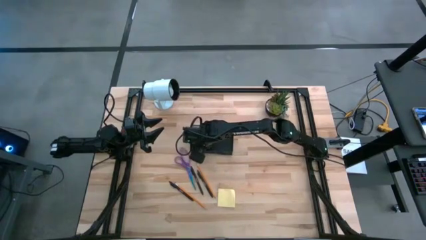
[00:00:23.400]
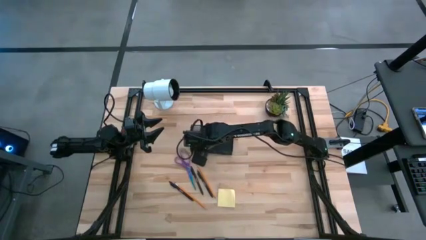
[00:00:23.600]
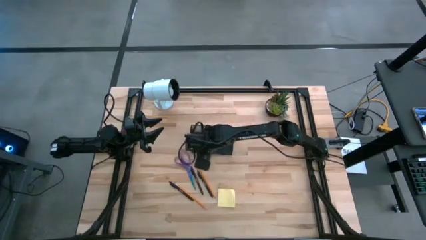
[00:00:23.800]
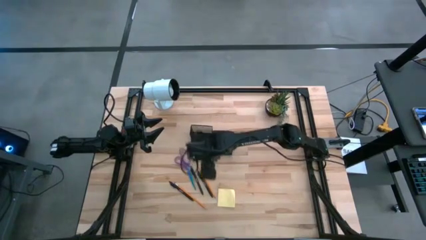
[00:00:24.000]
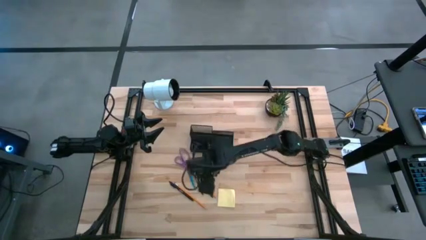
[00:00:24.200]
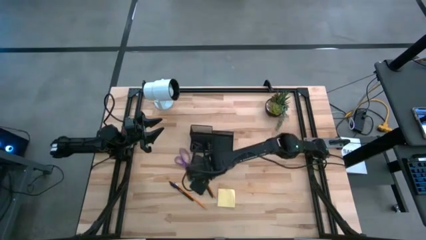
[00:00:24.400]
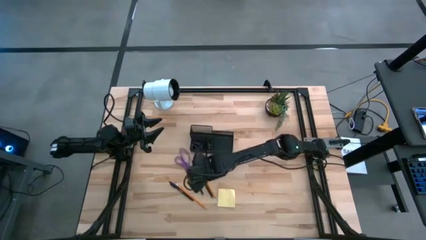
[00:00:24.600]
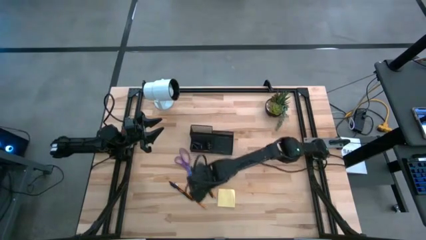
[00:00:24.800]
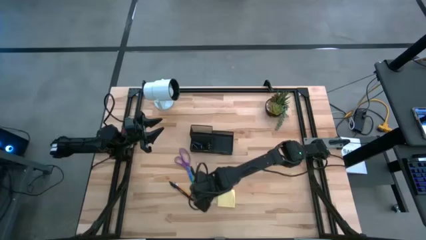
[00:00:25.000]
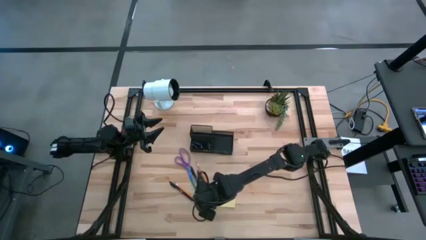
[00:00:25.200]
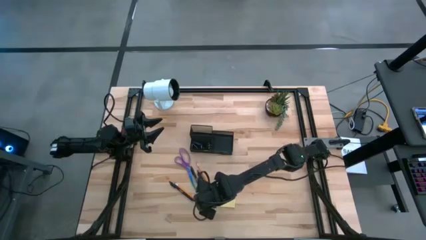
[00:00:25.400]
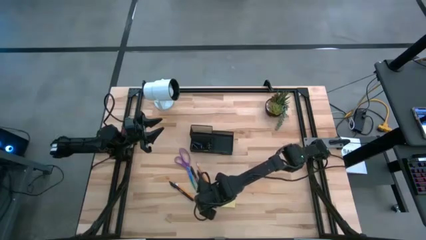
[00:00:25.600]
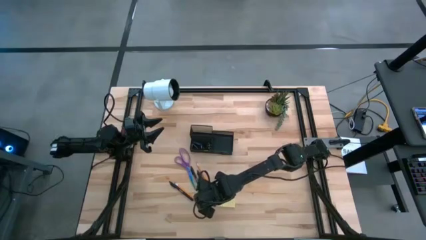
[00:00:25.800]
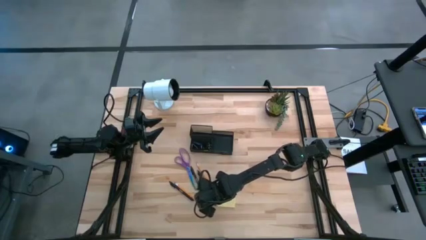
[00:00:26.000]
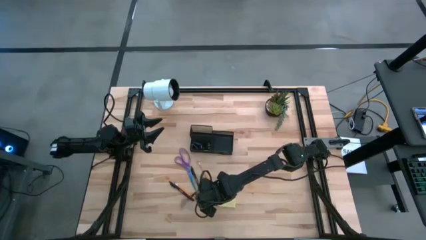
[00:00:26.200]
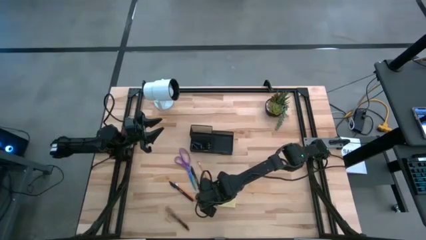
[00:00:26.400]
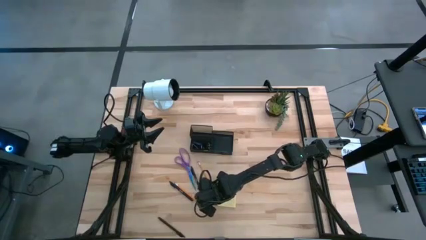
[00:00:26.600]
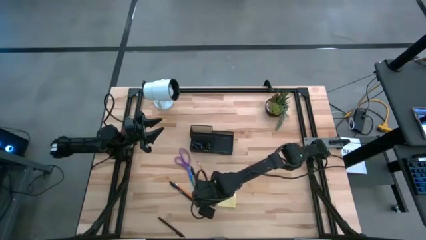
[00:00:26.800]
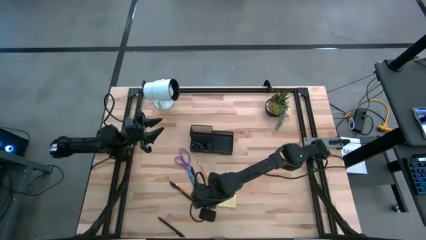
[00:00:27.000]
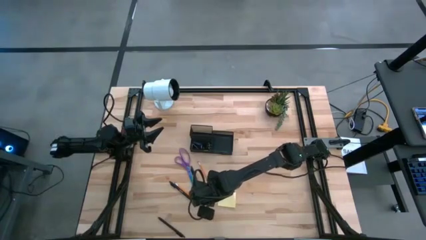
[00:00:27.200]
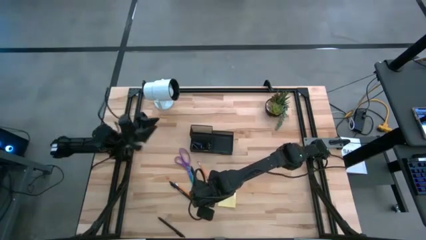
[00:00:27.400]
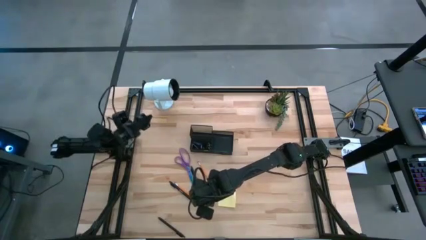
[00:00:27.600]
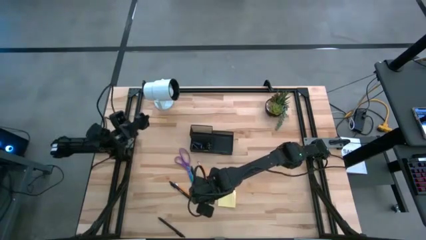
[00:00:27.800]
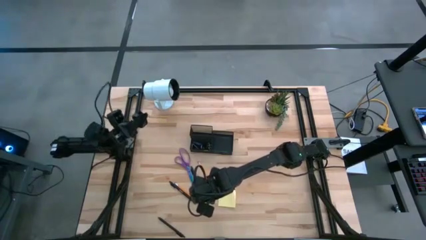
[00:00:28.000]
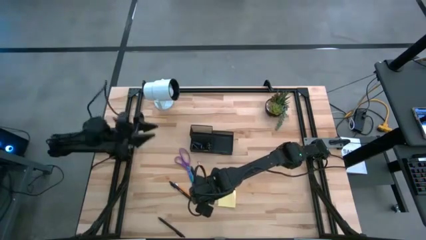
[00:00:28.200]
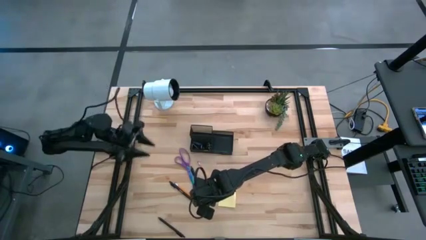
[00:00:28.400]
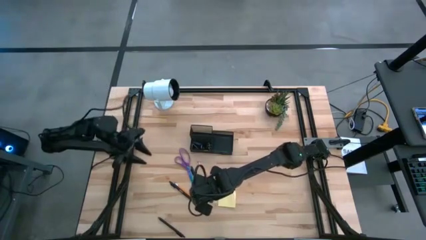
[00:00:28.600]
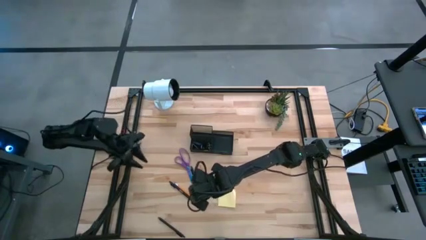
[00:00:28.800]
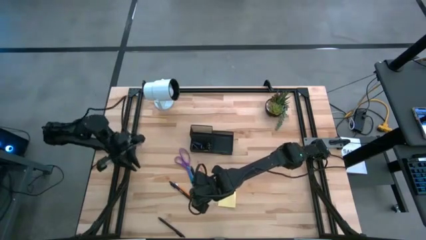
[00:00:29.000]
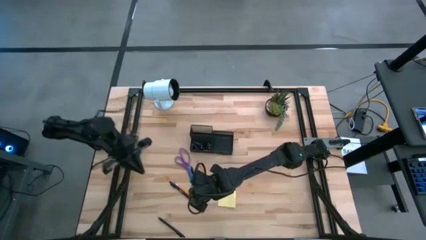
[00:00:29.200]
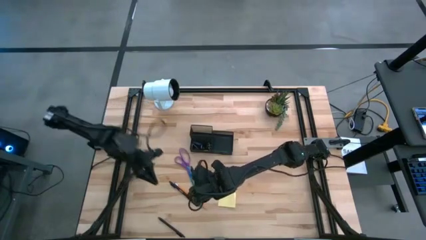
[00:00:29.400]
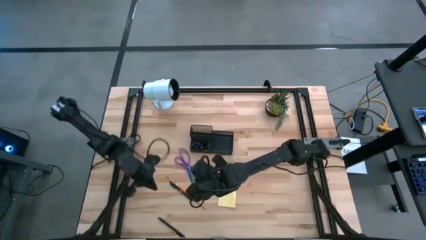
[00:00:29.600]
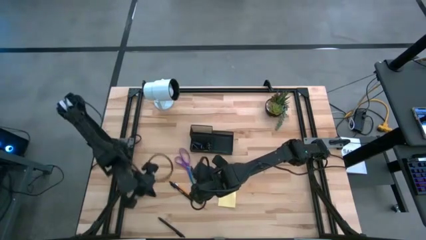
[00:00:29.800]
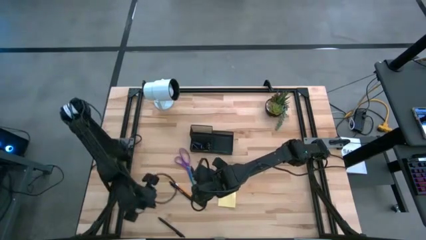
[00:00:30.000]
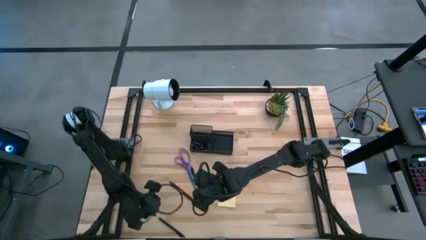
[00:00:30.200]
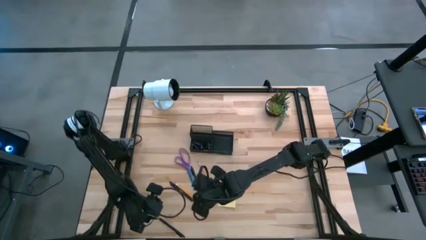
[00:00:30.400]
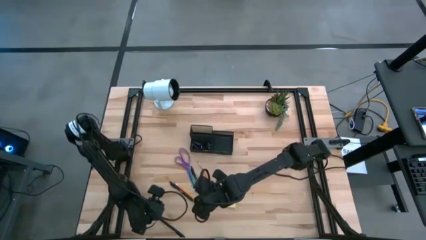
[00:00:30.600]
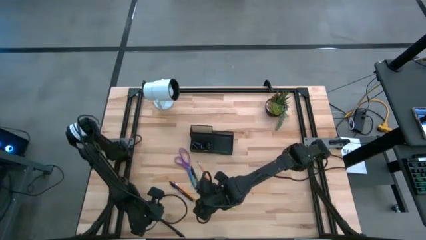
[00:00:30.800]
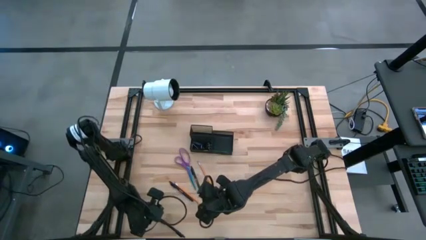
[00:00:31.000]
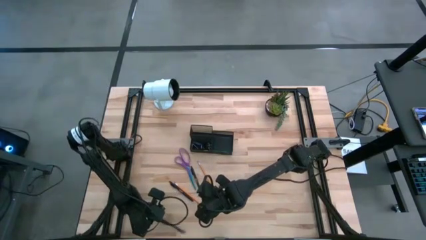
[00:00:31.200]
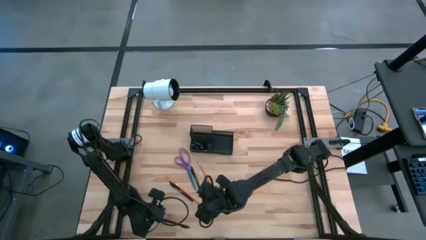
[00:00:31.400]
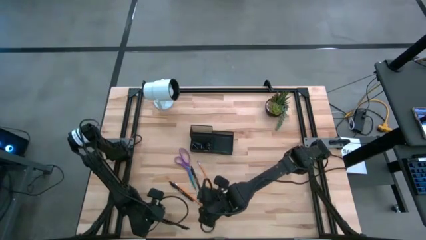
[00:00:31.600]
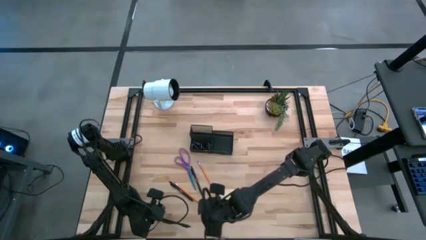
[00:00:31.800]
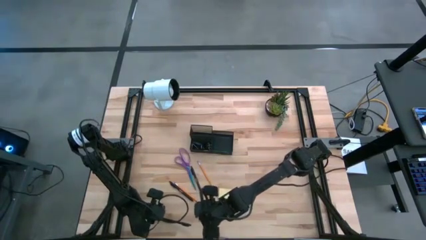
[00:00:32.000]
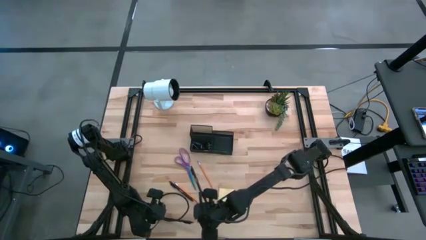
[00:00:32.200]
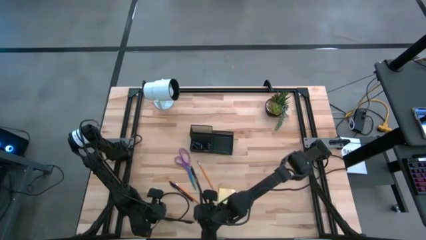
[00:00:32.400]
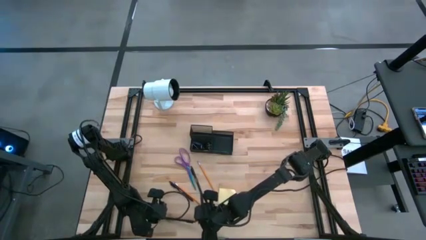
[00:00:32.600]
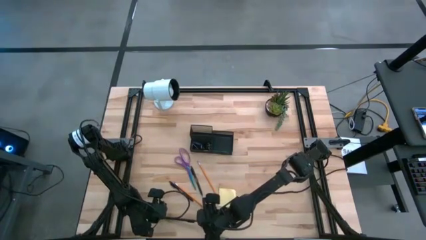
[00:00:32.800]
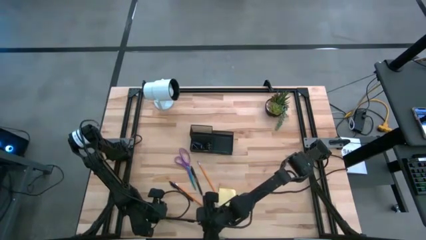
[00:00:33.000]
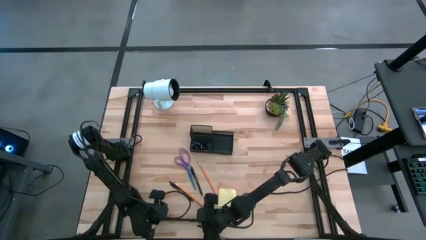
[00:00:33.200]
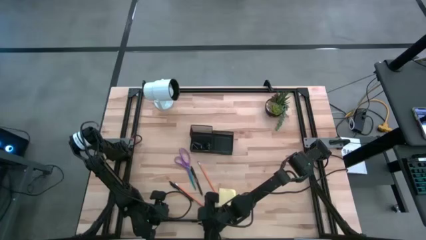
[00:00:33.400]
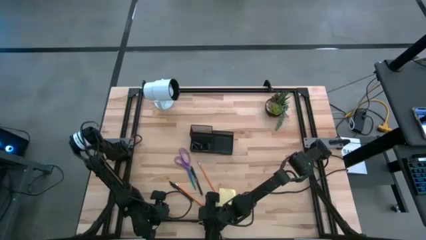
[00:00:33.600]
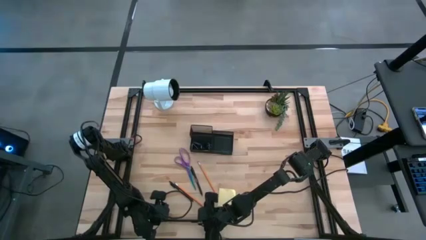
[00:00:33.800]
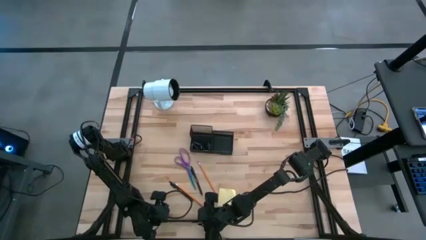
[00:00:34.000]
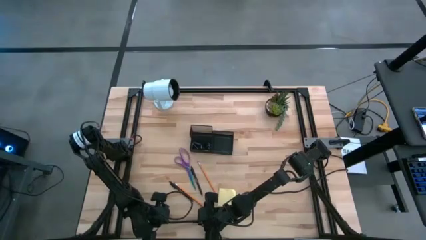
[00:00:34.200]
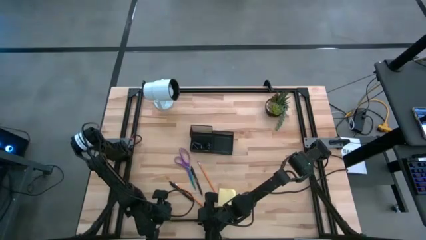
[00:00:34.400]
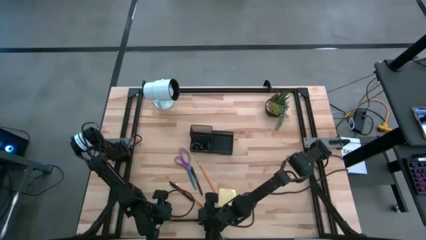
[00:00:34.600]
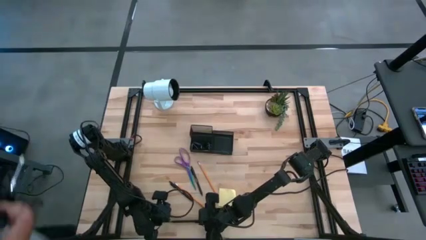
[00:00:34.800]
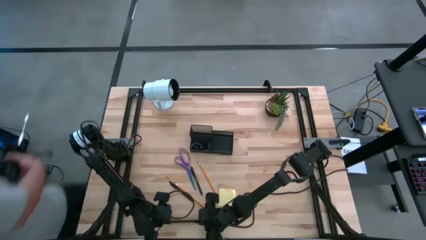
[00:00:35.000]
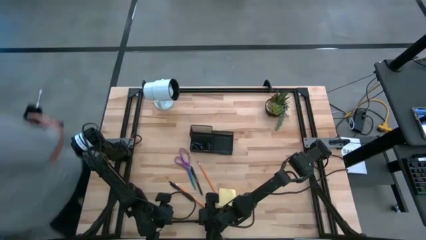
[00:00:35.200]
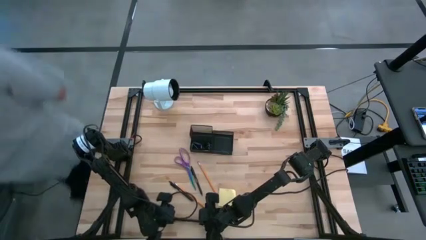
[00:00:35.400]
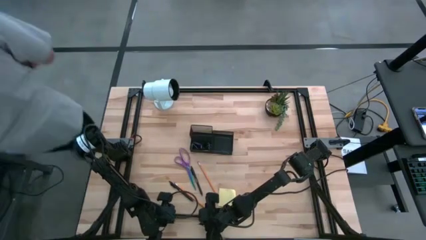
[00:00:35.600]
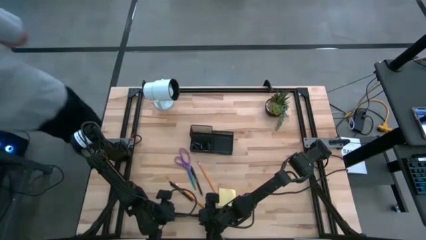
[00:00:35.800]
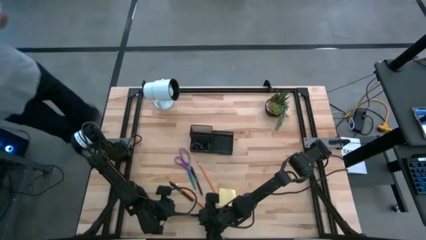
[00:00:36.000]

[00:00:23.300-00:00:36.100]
Task: Pick and place office supplies into organizer
Put the bottom black pen into the black desk organizer

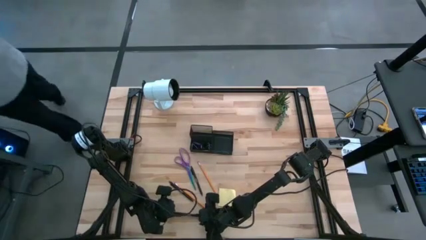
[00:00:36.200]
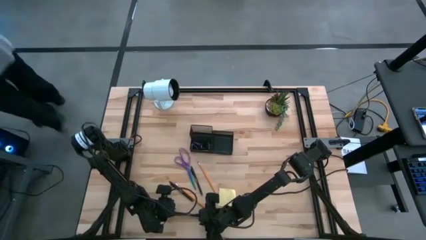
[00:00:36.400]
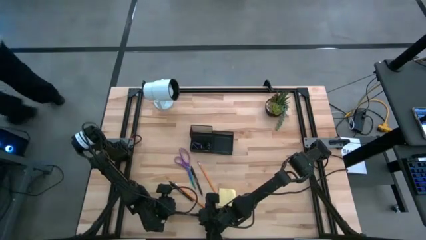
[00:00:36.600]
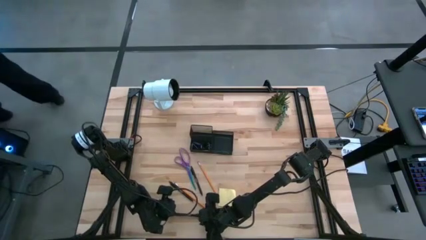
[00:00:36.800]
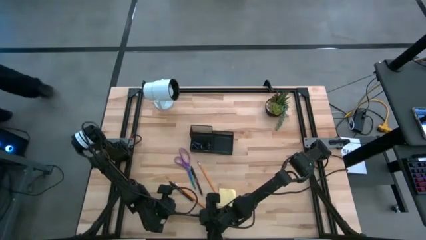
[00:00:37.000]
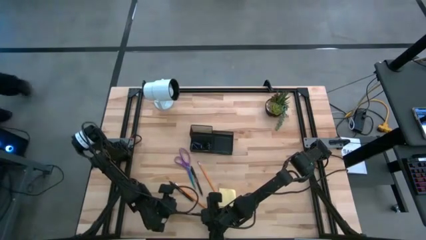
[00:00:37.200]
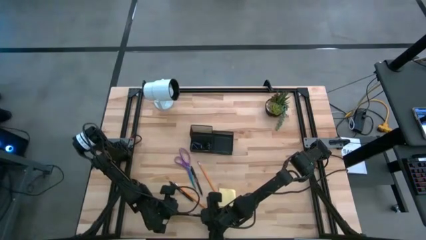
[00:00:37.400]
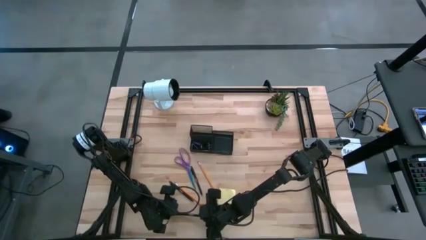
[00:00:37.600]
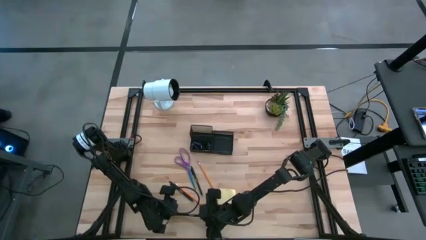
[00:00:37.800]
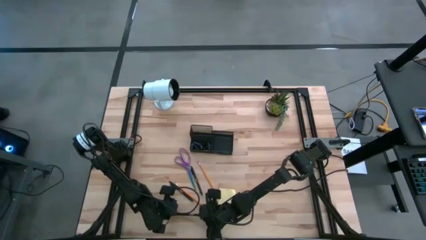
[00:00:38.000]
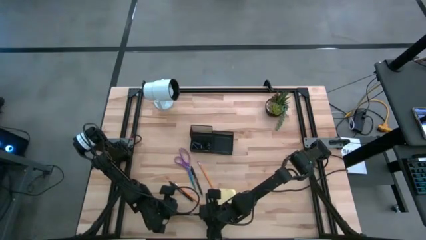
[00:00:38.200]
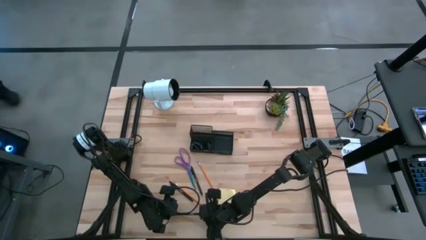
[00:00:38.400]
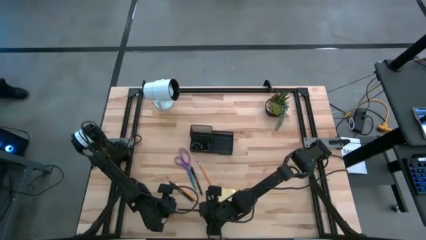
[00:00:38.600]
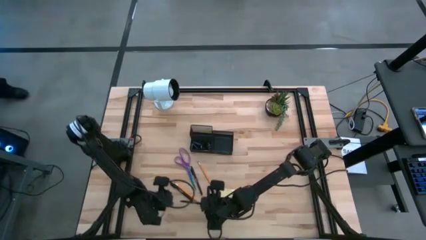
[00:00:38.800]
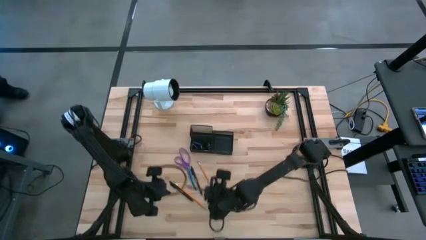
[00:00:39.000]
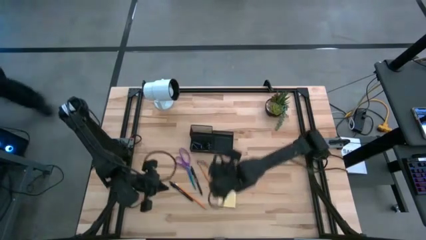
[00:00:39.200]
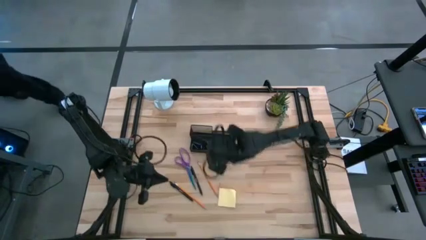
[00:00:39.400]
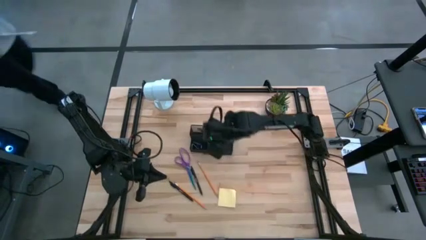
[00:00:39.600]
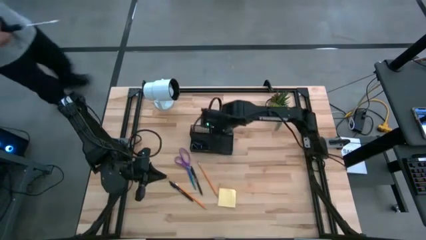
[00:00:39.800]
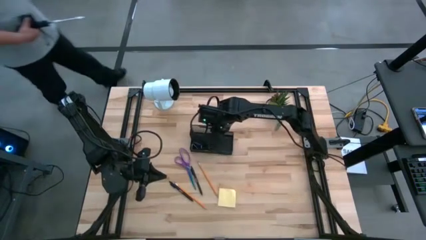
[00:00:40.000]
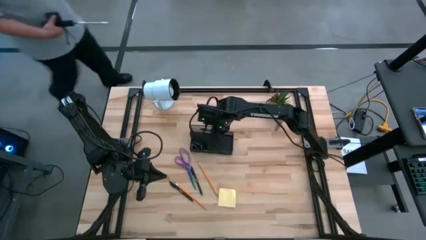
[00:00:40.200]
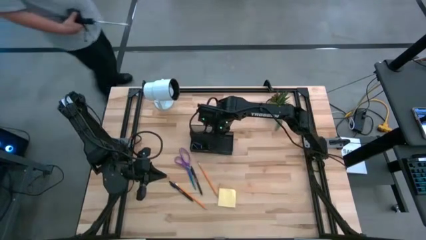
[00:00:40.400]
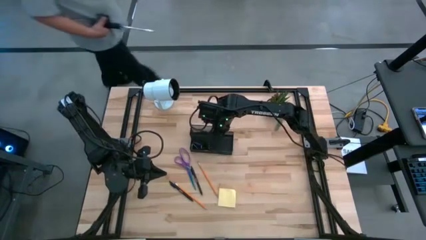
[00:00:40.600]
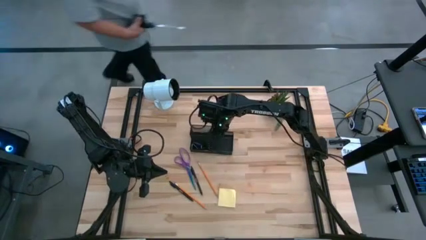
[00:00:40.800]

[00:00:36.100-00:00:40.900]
Put the bottom black pen into the black desk organizer
